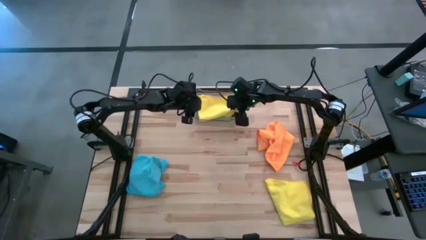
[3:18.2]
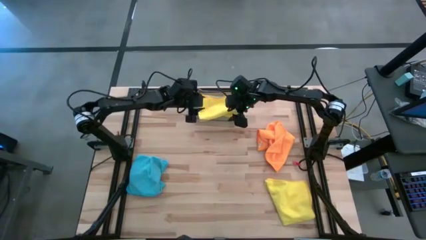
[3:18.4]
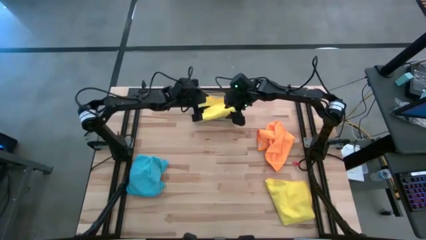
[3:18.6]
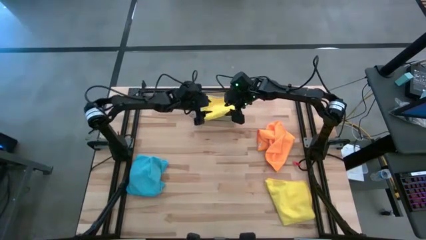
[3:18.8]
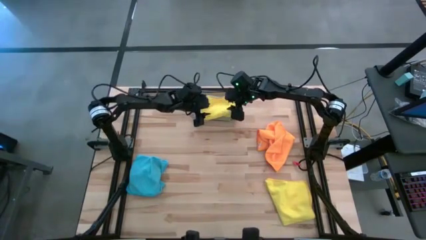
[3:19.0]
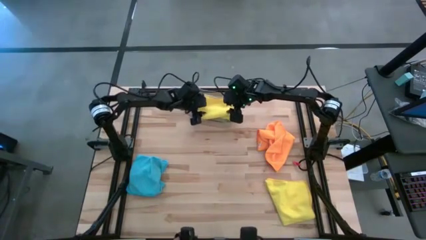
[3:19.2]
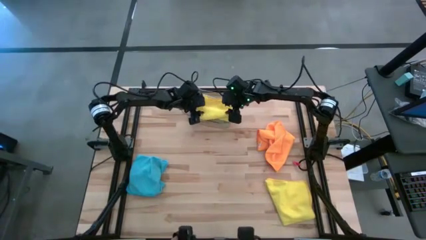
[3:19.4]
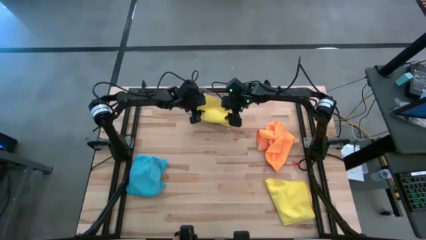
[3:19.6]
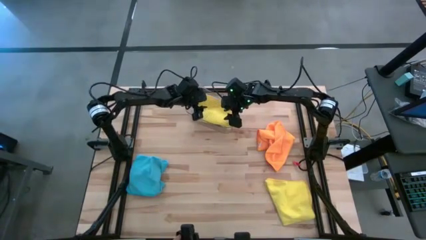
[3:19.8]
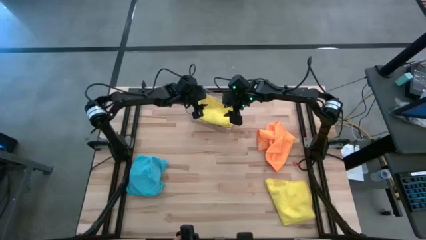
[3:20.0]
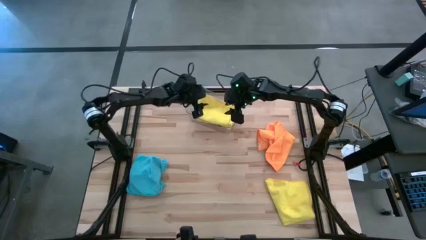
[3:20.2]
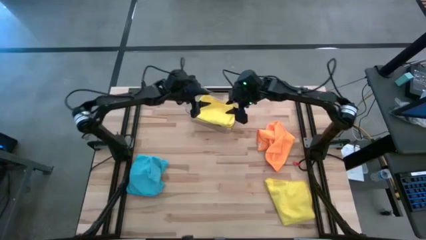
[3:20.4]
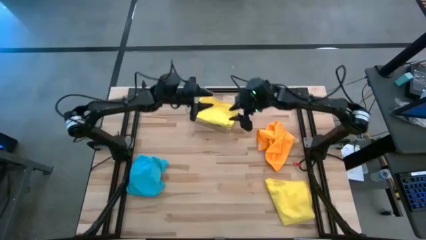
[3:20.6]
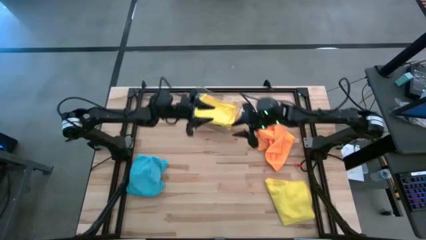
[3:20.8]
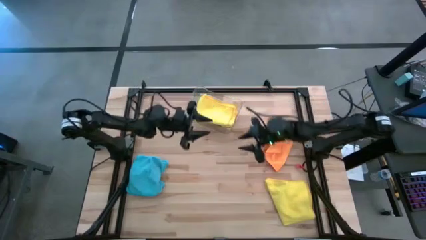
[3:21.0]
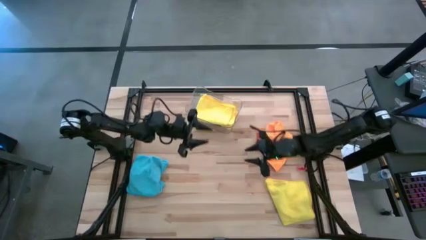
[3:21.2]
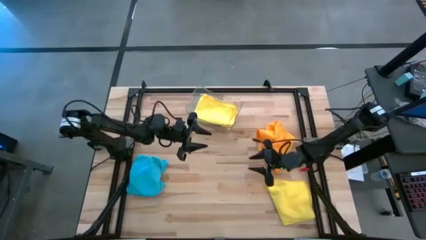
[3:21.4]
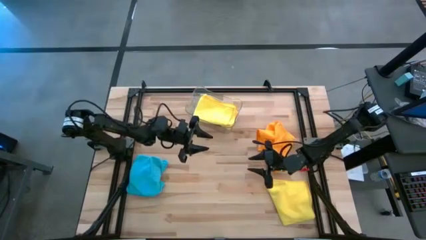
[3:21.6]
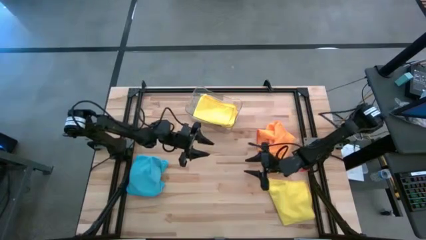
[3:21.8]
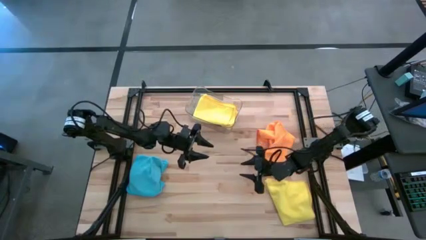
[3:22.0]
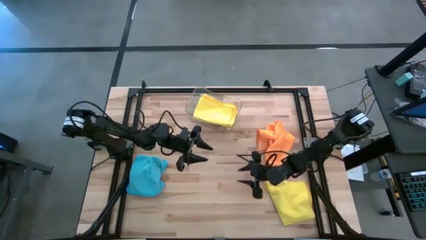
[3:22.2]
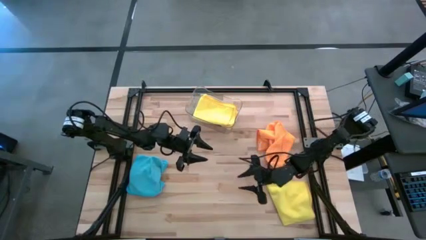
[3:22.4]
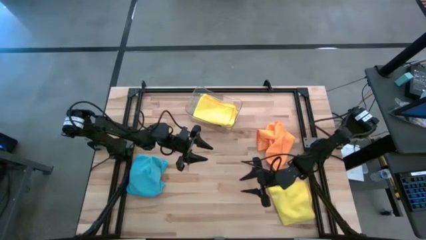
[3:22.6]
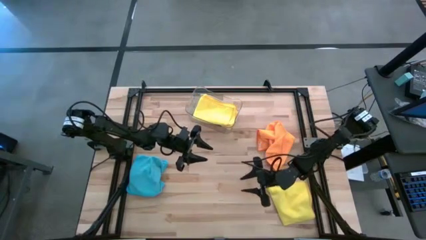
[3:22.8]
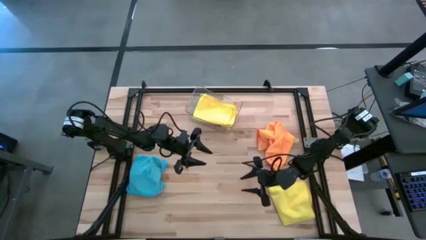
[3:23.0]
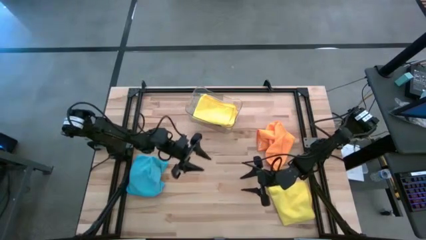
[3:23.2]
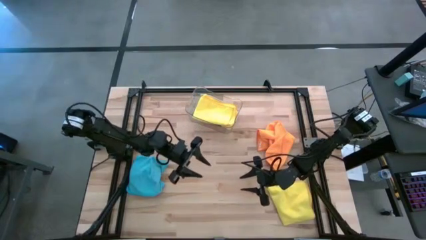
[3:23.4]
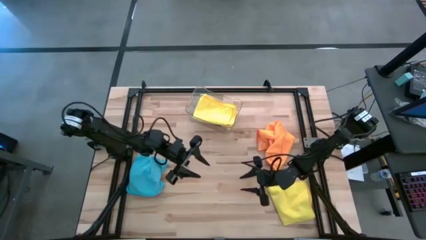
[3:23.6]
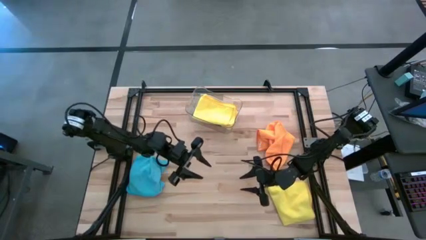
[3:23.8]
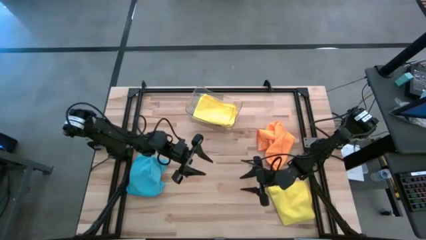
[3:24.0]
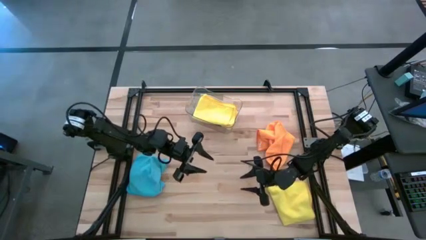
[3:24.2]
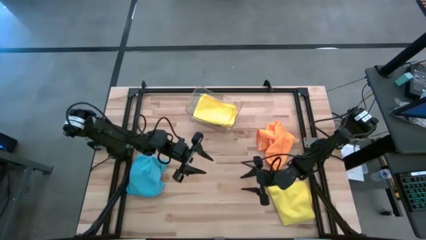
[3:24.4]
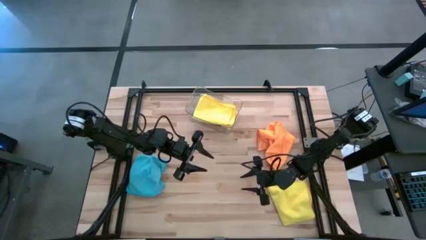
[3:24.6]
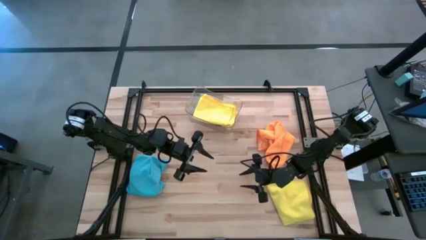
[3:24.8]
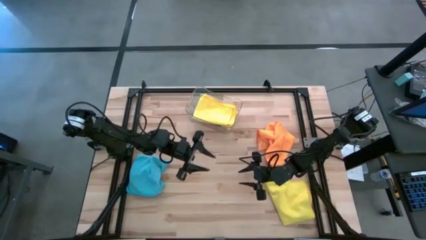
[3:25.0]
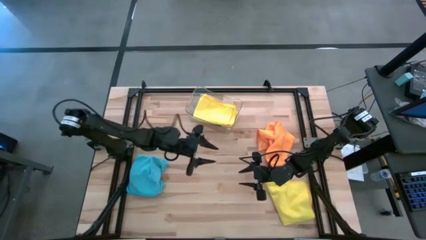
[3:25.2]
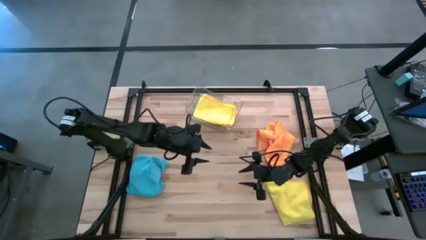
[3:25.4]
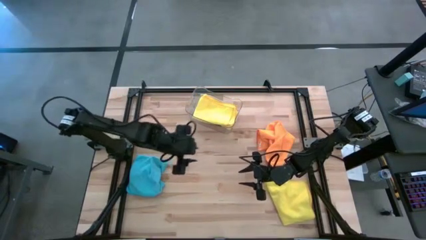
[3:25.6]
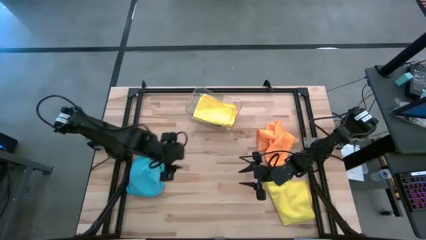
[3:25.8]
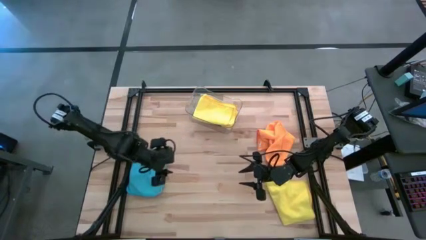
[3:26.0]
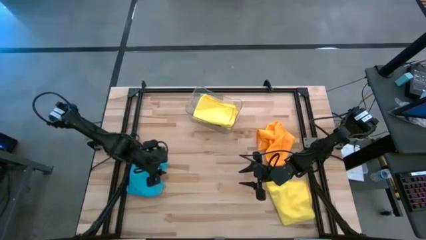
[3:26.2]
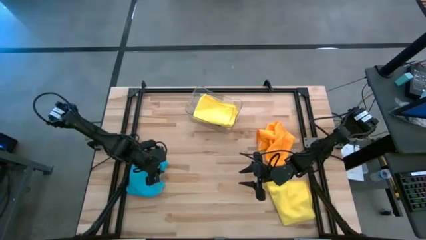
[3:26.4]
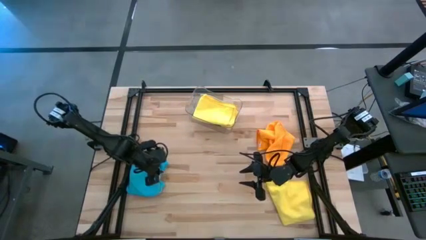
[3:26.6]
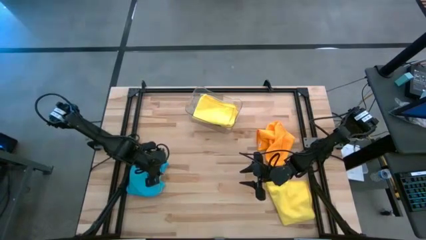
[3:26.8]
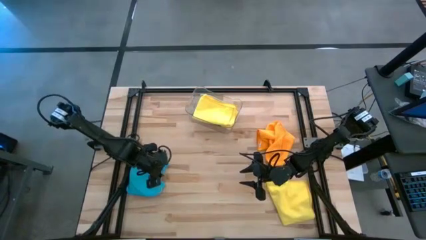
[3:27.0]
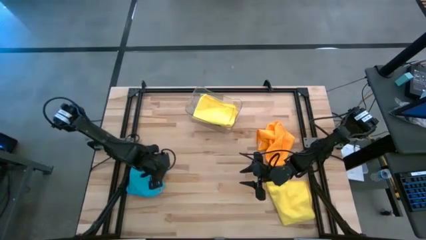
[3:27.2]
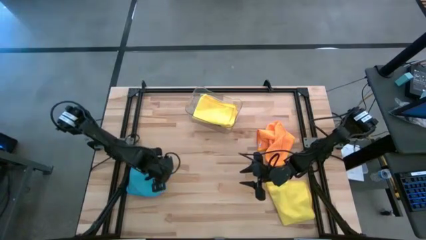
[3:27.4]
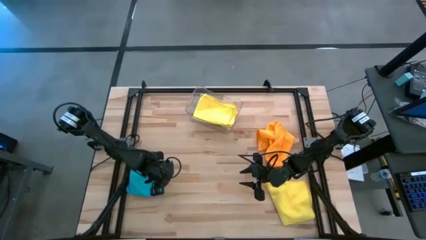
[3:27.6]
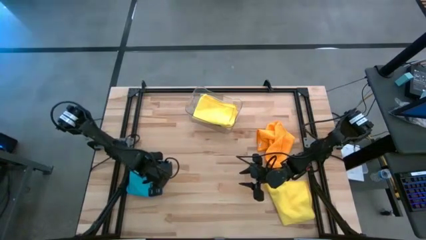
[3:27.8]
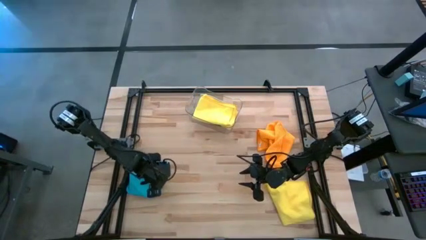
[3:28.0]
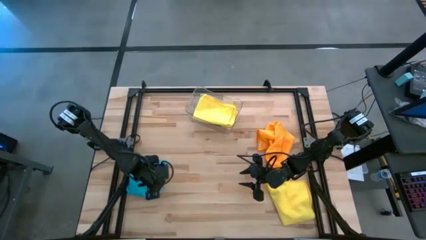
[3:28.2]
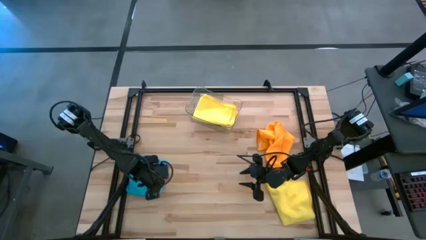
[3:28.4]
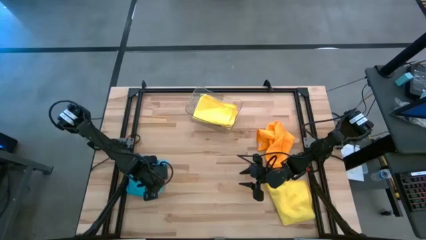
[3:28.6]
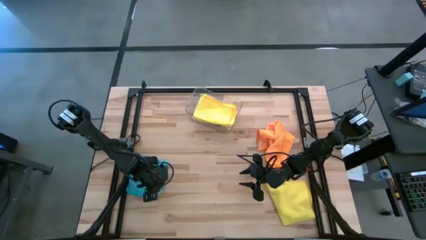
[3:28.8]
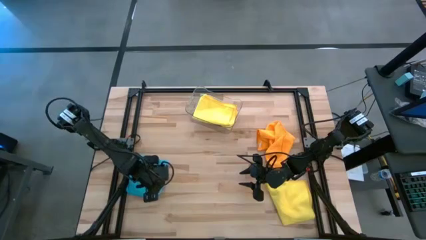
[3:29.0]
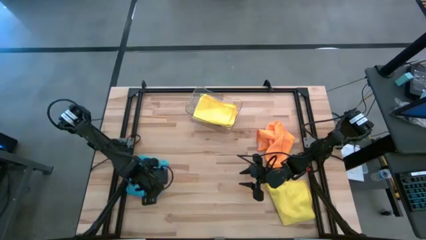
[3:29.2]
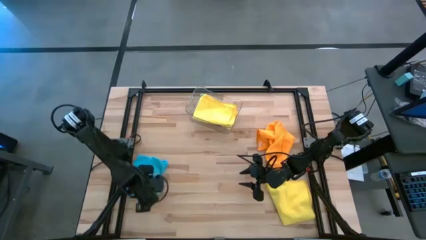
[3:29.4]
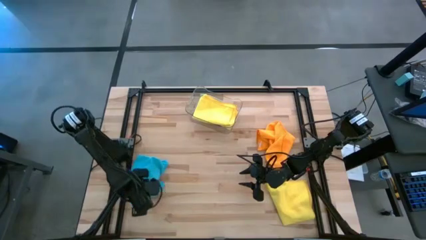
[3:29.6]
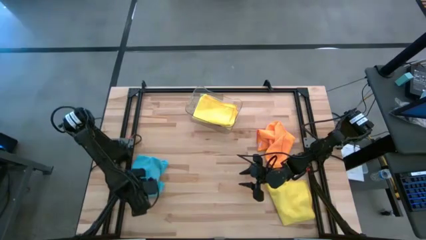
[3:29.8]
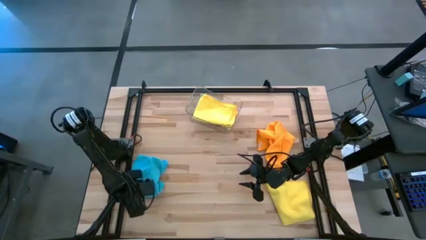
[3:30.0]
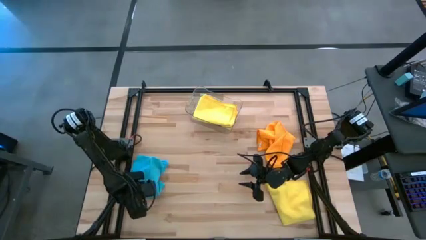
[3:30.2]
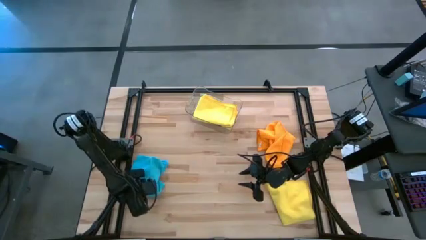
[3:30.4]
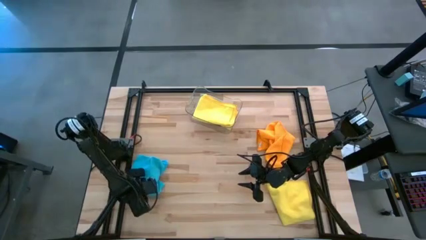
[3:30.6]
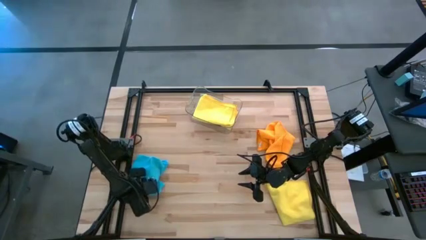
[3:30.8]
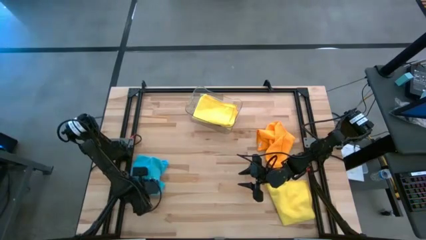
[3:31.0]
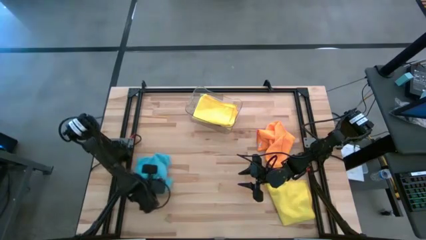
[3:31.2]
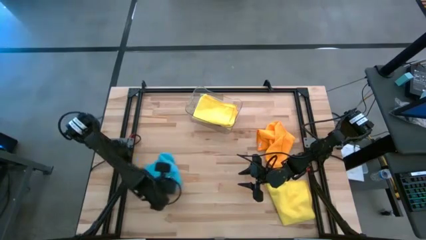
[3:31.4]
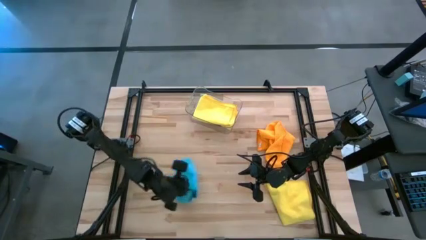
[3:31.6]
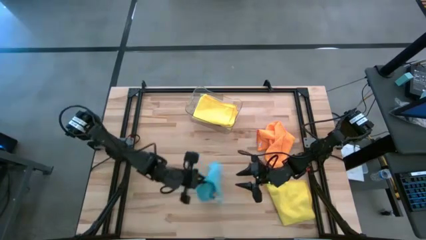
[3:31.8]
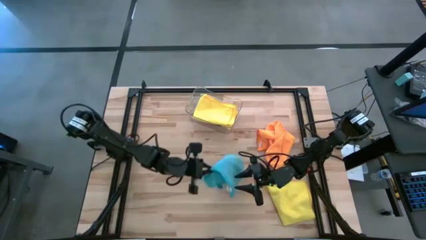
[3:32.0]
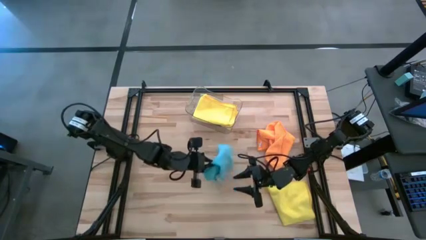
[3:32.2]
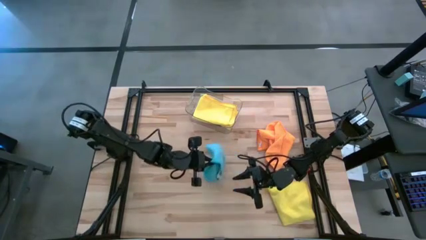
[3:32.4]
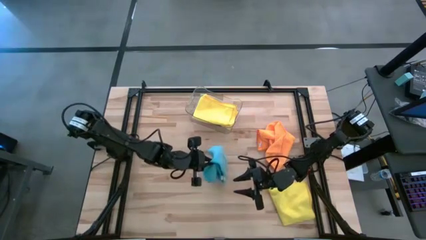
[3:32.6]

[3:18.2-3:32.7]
Task: Fold microfiber towels
Fold the blue microfiber cloth
